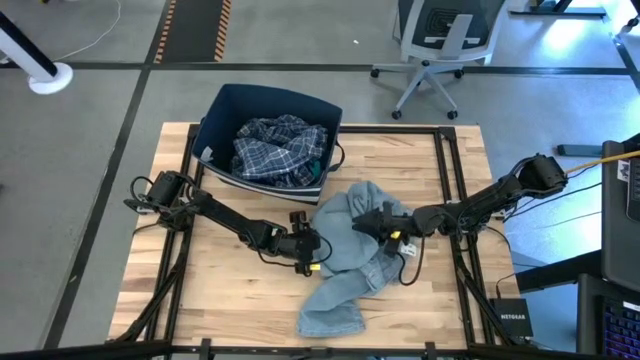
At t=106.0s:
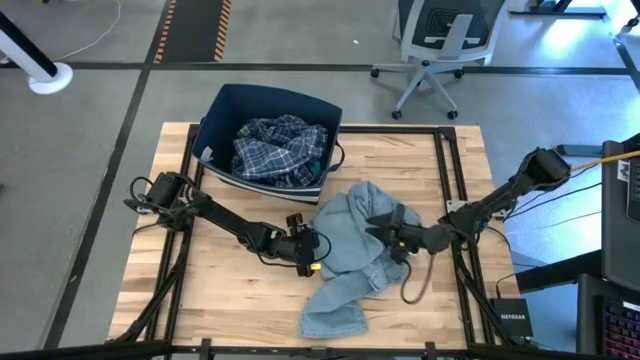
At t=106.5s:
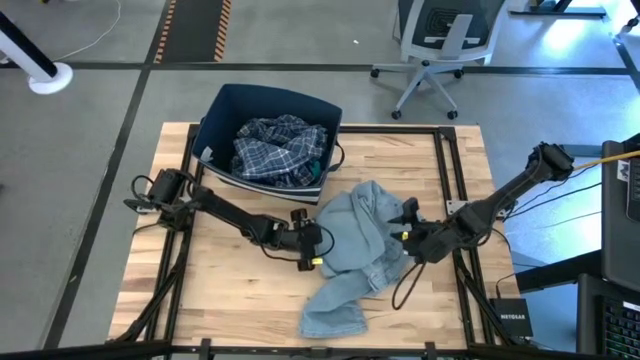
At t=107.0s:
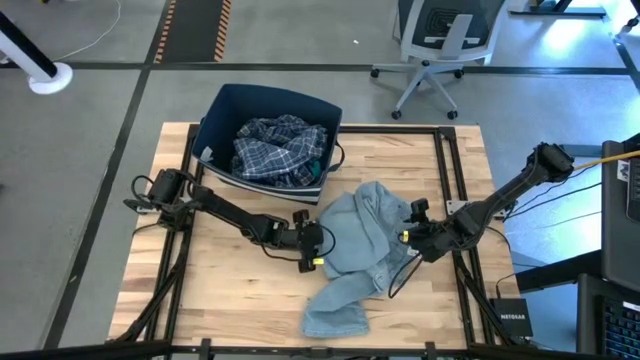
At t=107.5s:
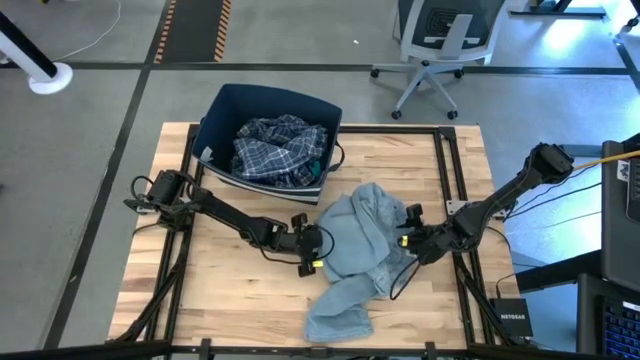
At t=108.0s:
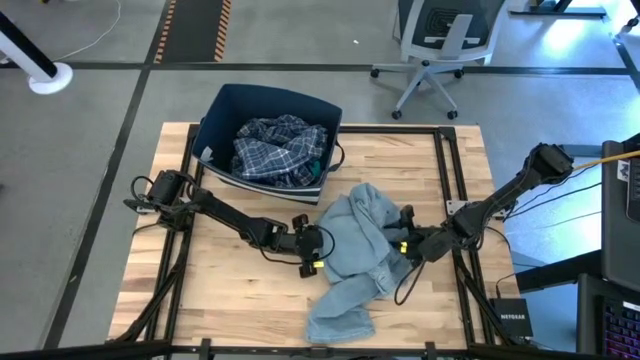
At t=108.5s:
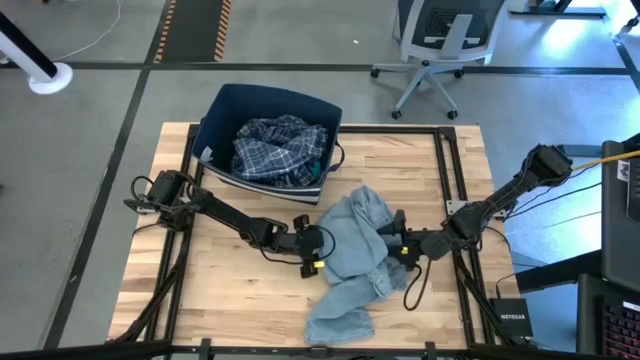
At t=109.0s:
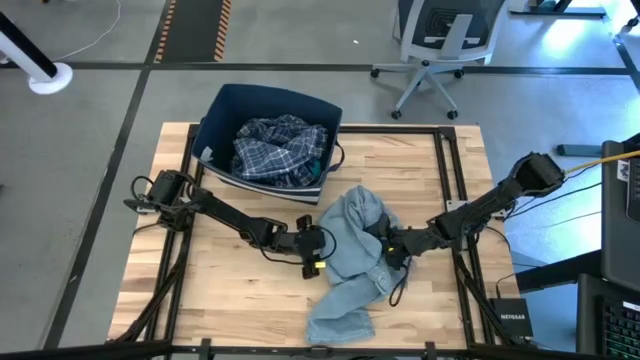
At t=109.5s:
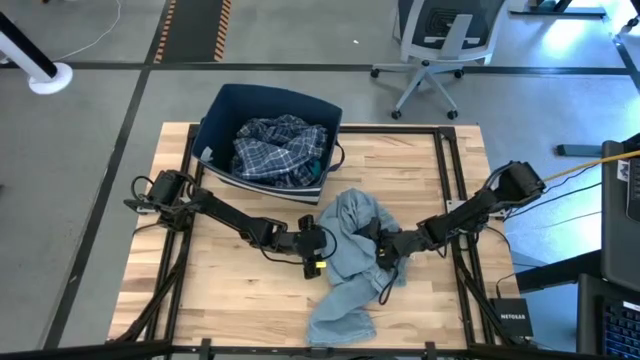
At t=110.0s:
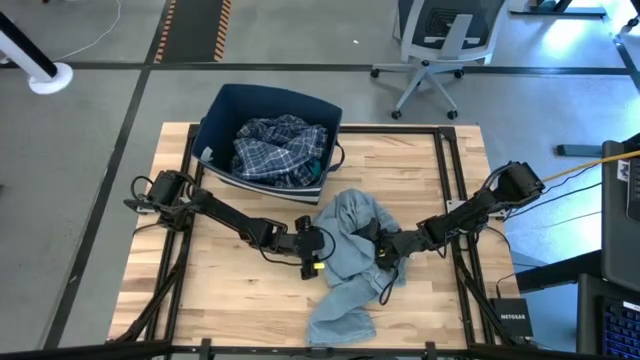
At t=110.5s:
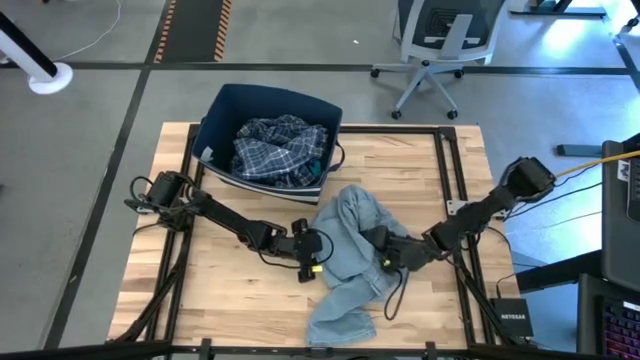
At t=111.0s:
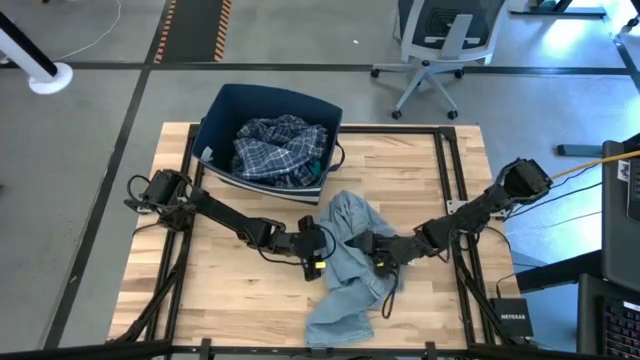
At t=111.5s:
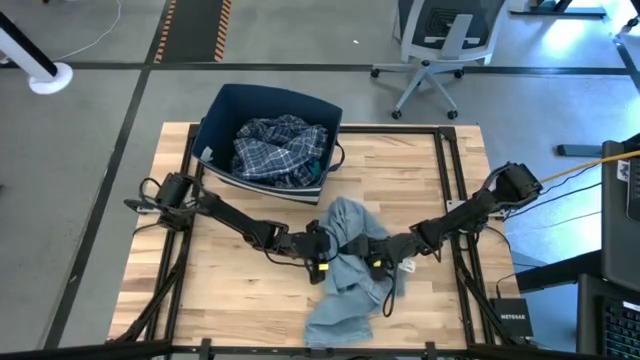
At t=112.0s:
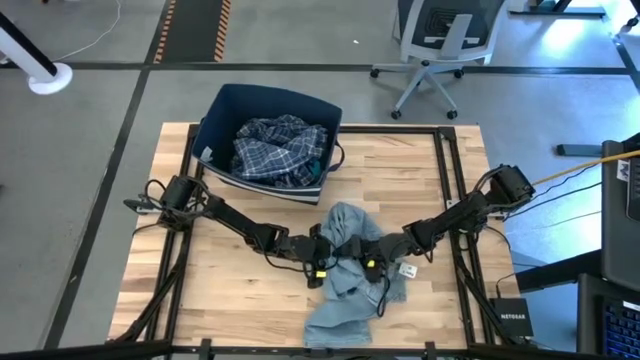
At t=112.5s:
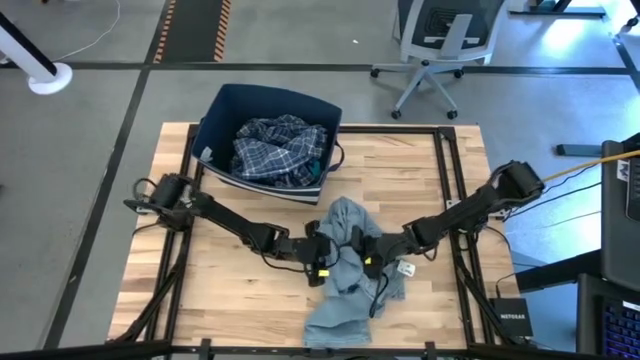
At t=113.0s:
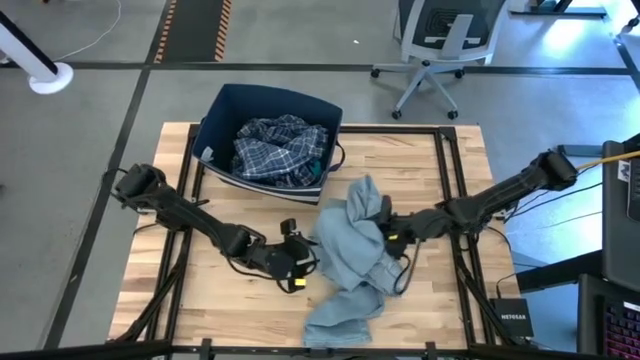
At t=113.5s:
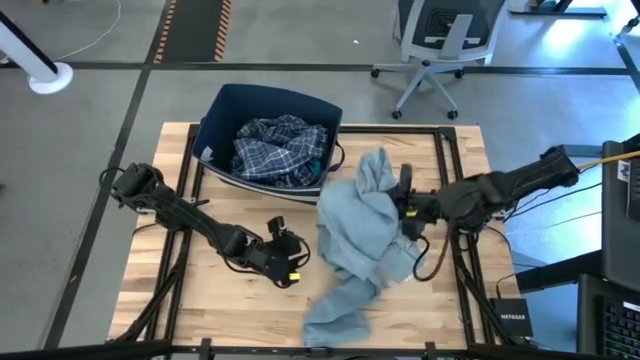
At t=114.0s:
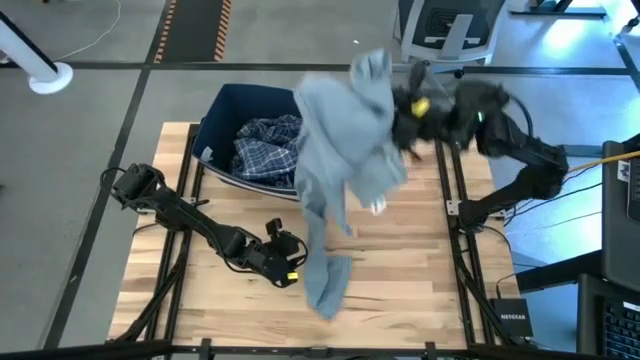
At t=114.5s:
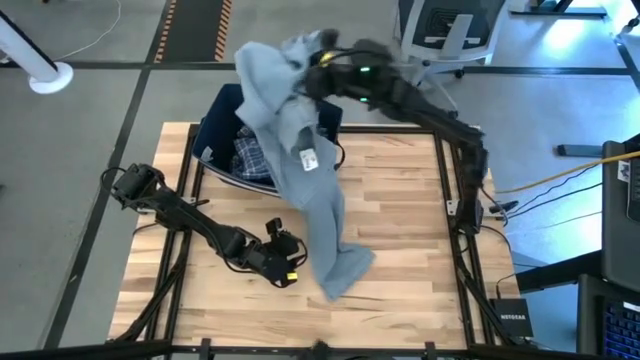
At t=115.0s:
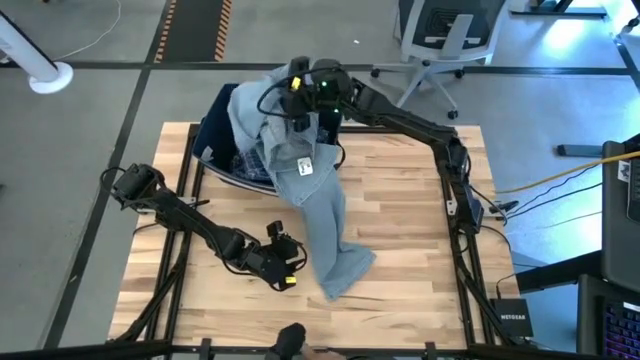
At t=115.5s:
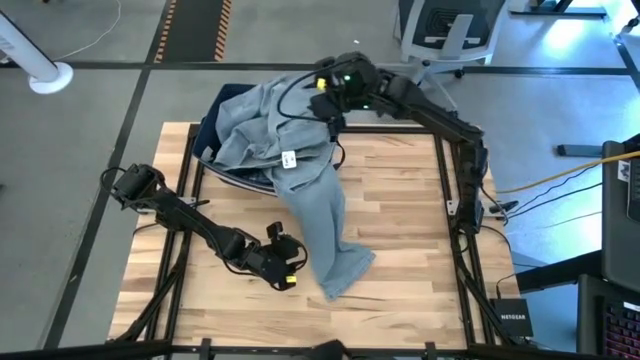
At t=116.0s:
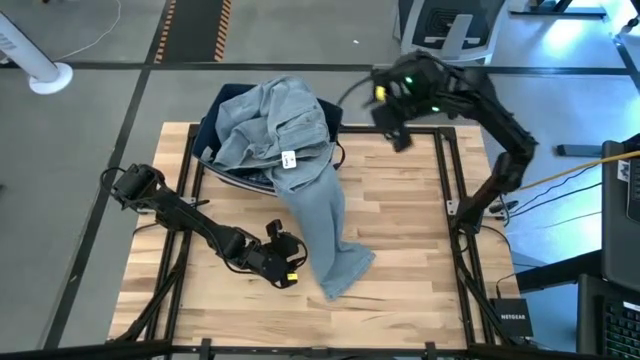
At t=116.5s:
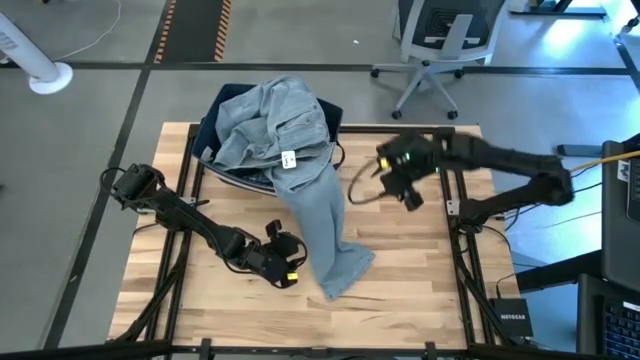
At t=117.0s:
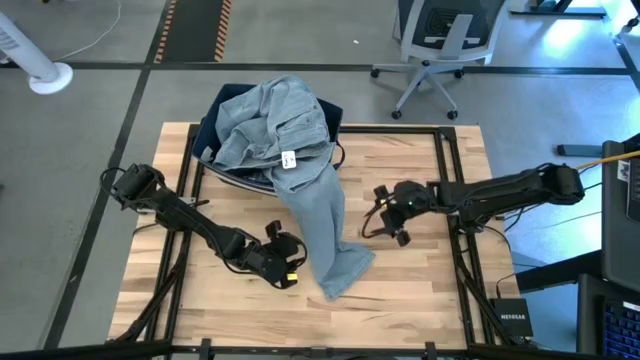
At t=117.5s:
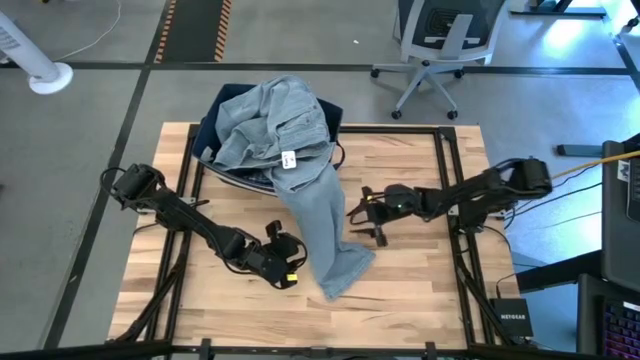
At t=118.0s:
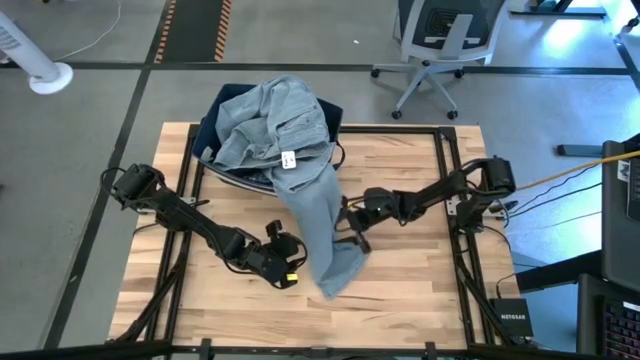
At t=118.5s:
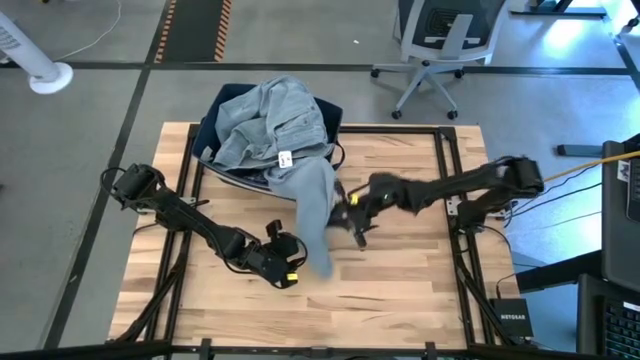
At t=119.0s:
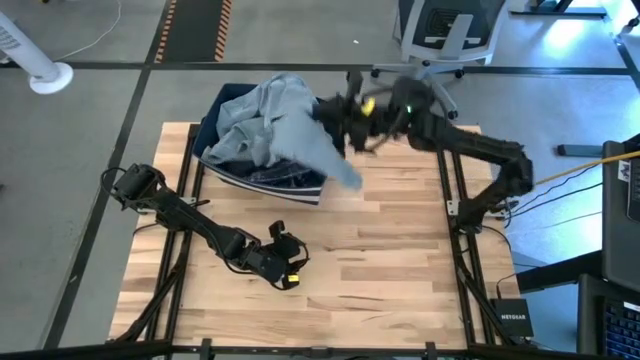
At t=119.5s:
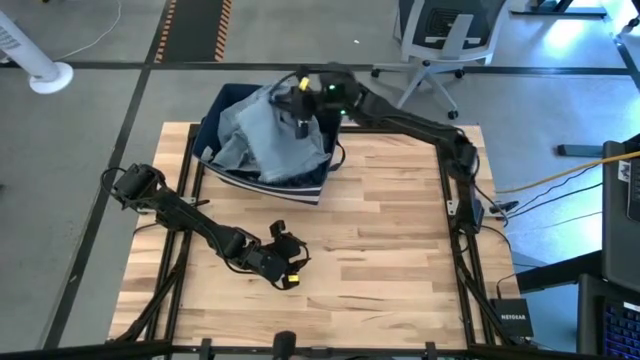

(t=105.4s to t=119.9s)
Task: Sort clothes
Put the blue pants into the laundry bin

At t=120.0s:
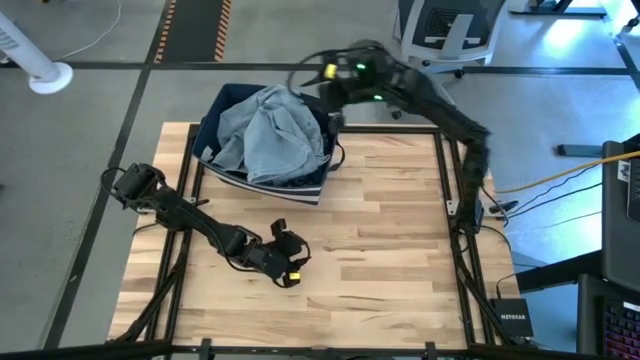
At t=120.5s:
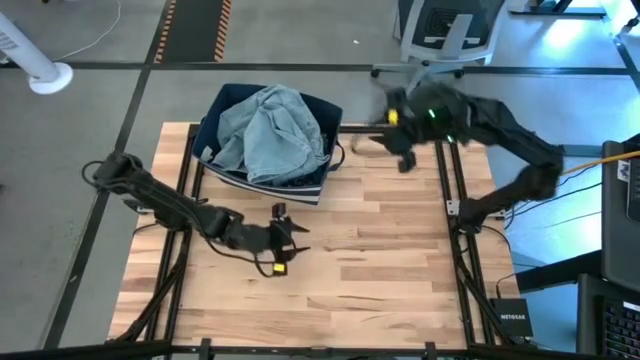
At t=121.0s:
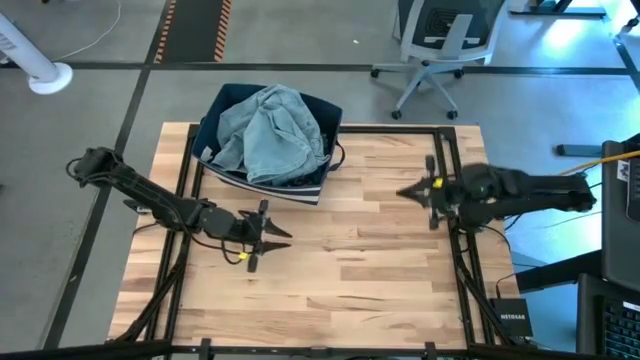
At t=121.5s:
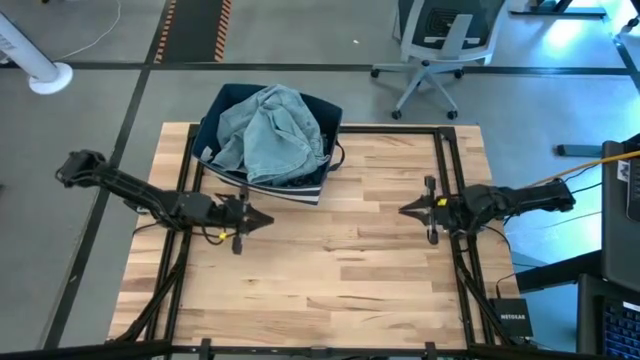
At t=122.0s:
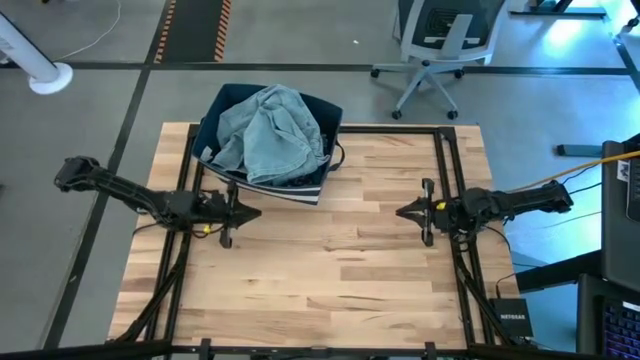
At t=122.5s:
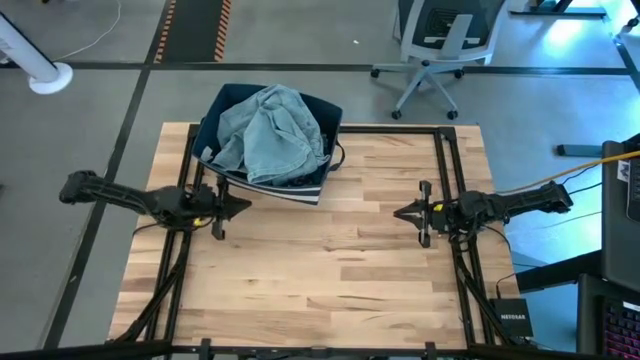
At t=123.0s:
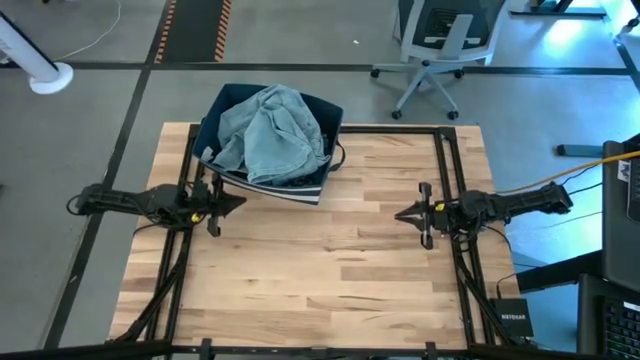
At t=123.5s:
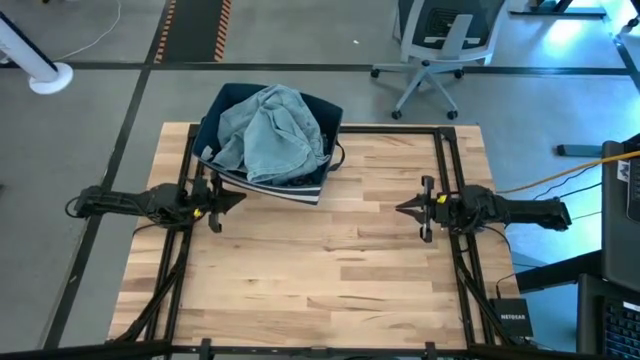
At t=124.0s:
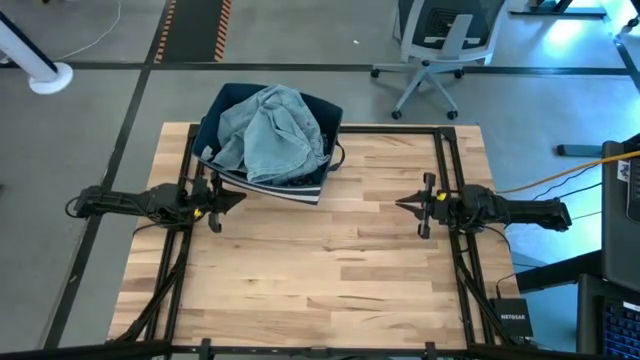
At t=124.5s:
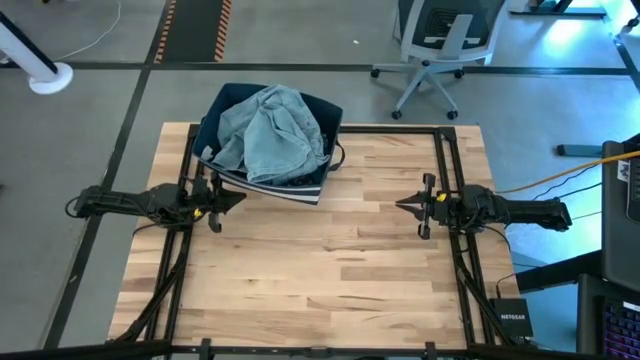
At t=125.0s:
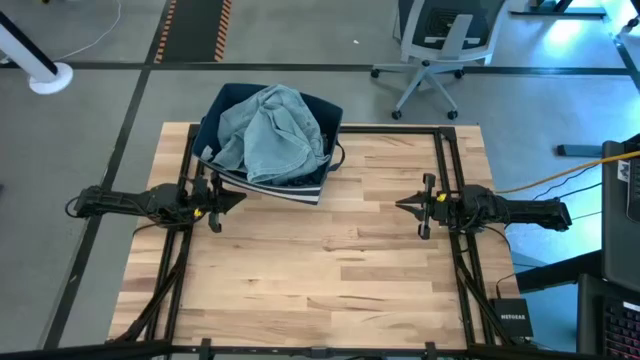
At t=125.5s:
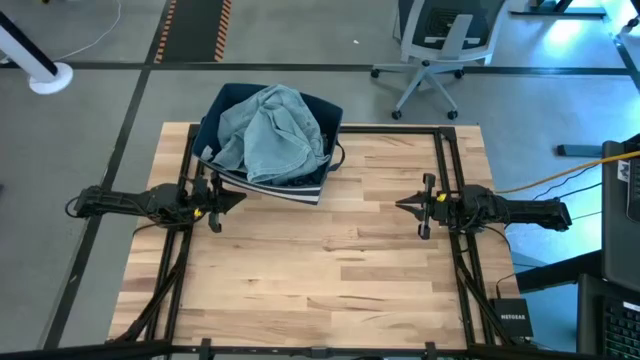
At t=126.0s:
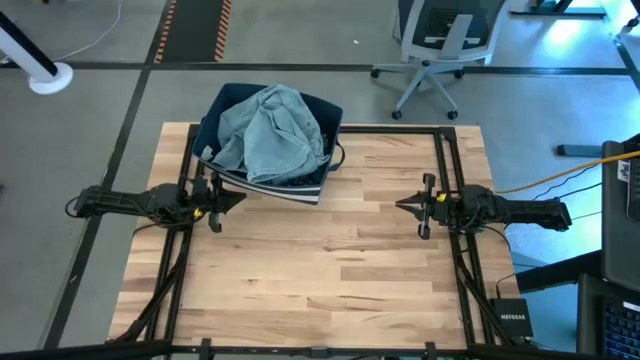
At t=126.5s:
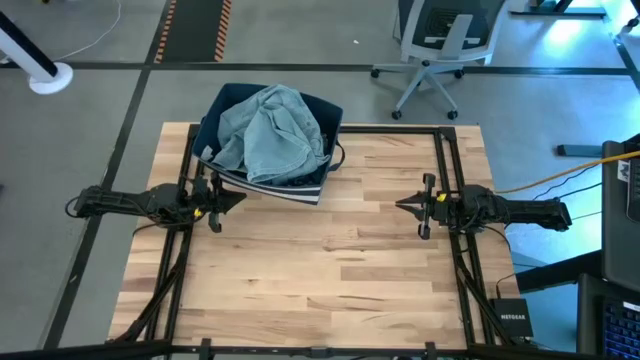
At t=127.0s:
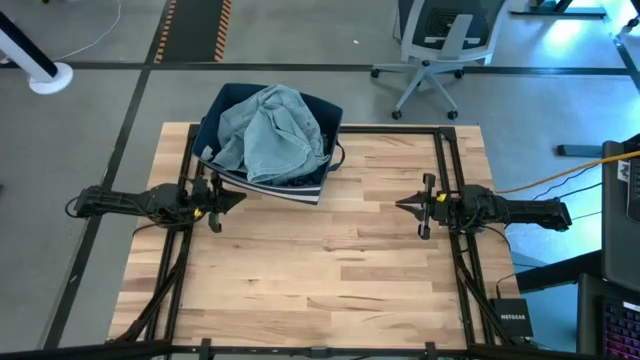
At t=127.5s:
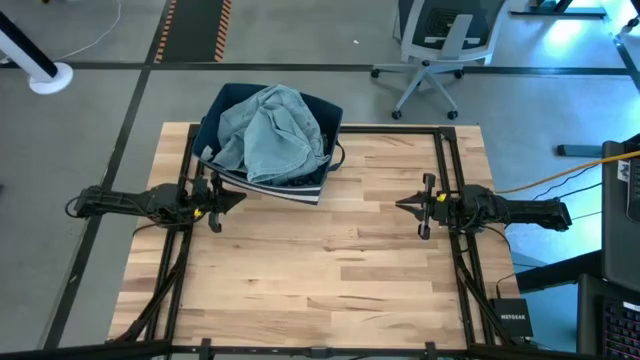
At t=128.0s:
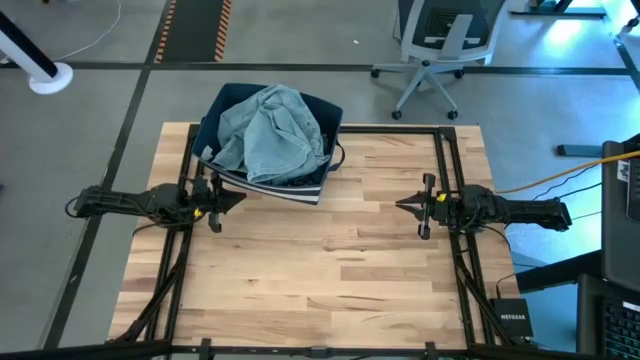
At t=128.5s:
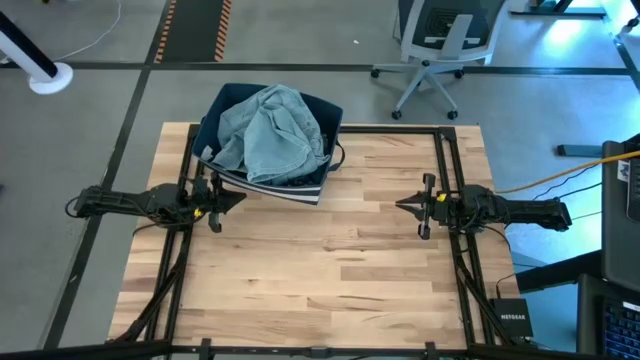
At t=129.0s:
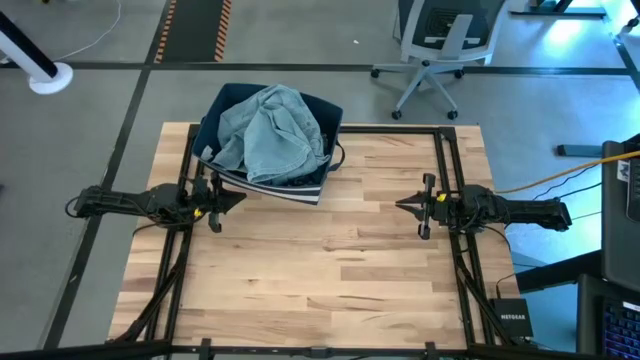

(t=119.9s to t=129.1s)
Return to Home Position
